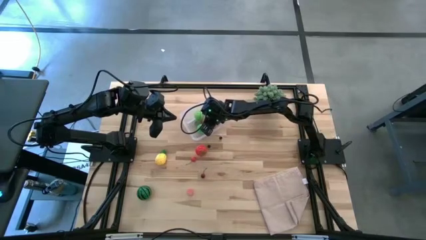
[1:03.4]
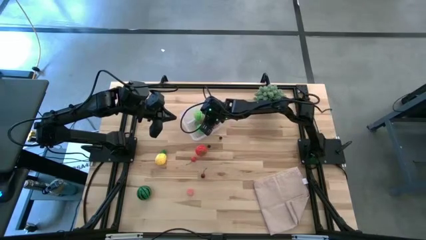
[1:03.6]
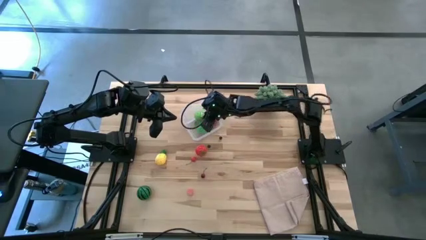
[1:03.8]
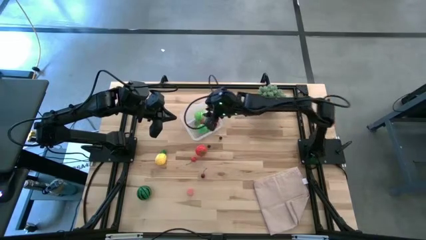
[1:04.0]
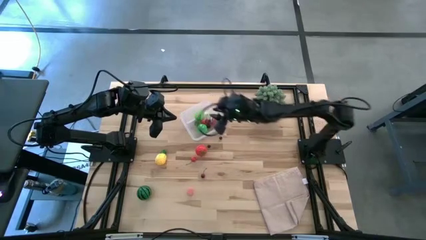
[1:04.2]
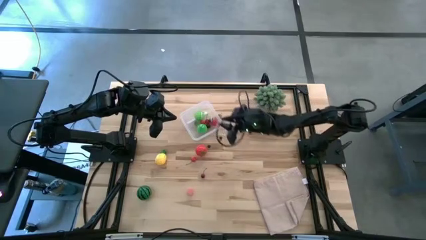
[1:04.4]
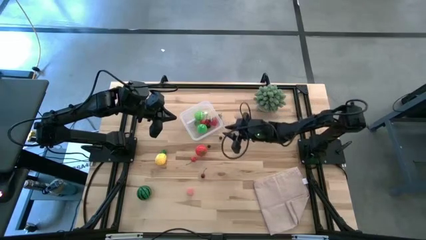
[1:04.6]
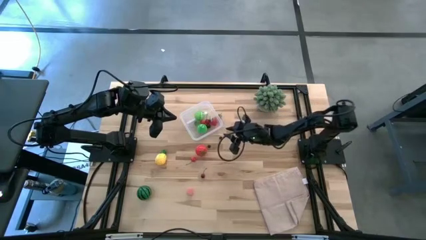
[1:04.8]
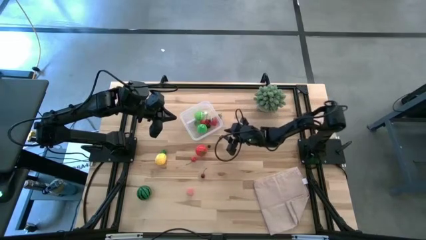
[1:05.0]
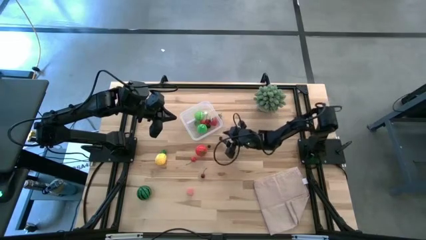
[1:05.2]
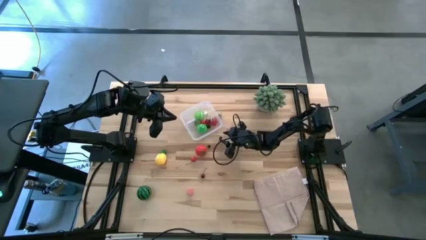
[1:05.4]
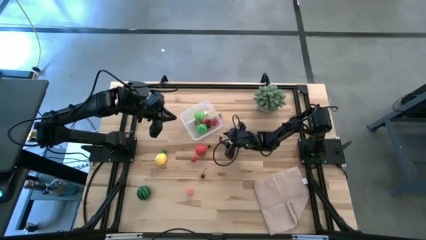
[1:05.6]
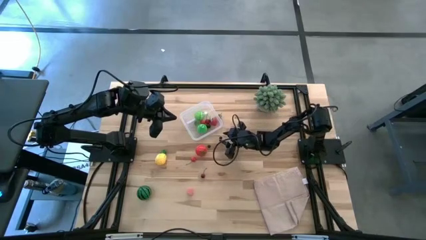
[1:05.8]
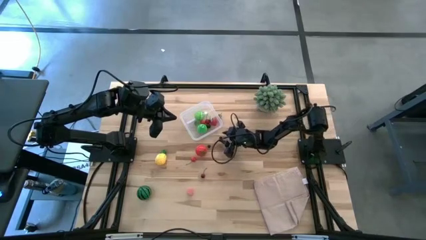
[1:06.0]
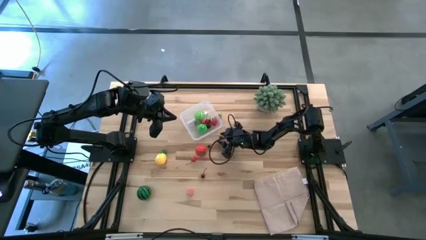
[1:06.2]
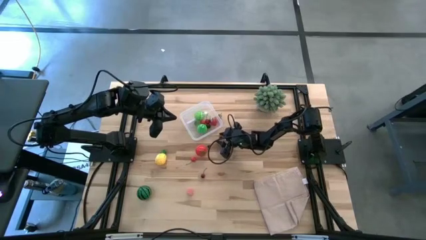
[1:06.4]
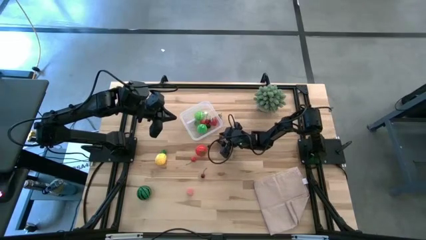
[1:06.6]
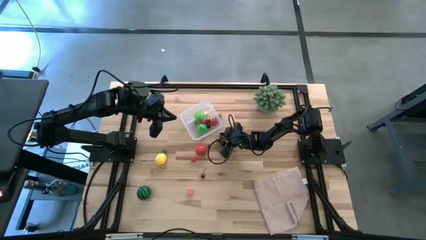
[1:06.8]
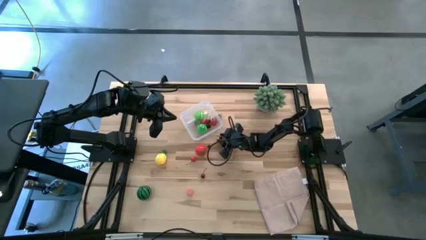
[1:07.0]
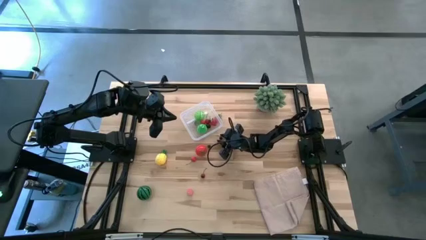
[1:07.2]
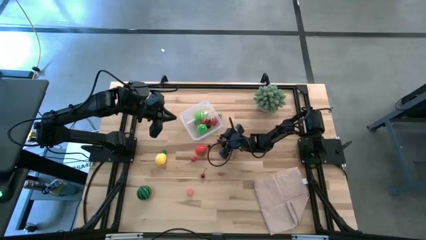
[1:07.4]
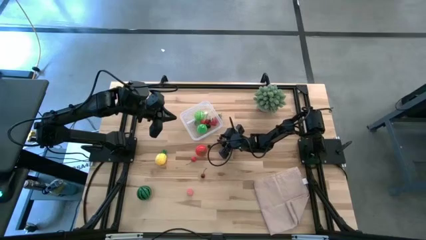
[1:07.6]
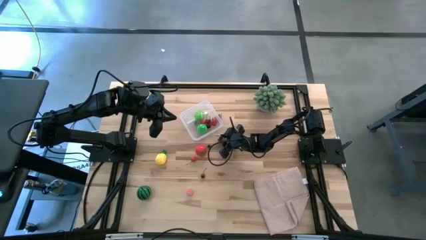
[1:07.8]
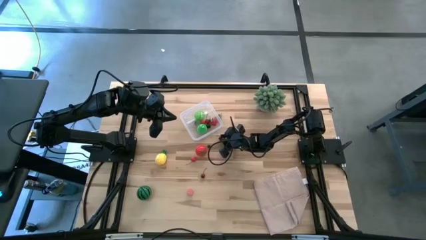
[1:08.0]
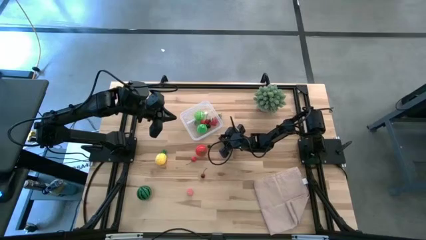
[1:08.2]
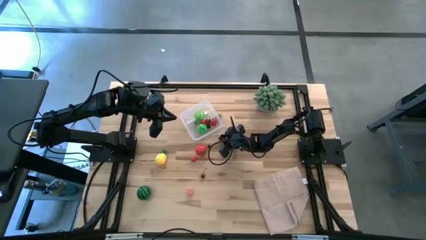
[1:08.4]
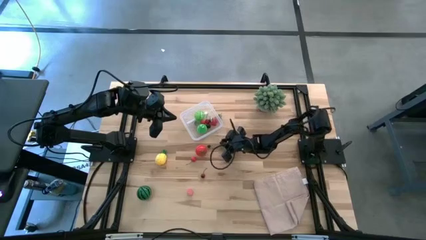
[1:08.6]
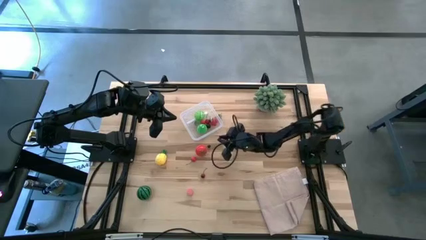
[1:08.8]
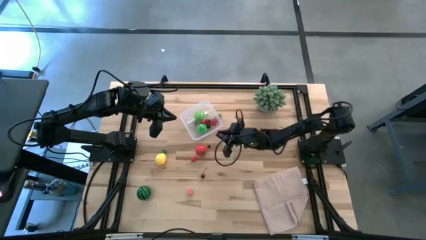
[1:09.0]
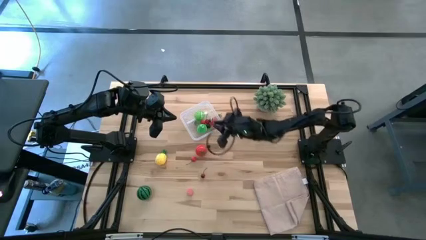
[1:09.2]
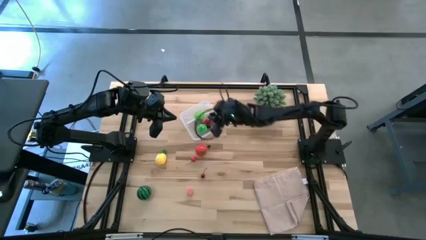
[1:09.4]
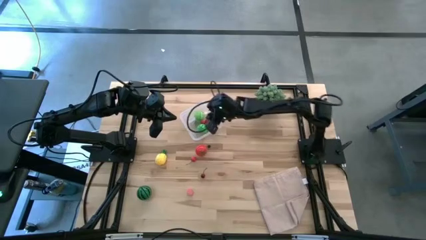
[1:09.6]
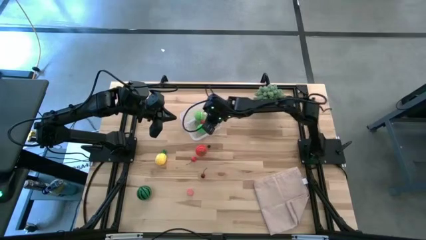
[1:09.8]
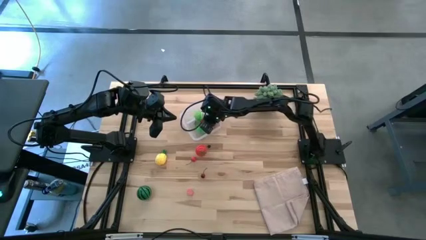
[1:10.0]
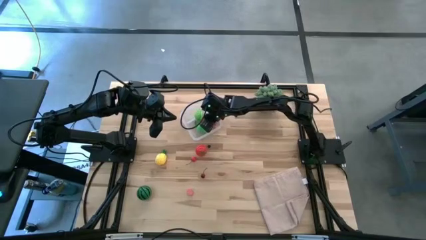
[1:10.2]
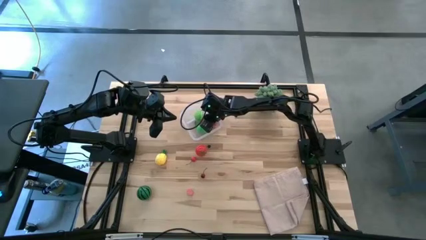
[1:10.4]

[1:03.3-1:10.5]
Task: Pick and placing Produce into tupperware
Put the right blueberry into the transparent bin

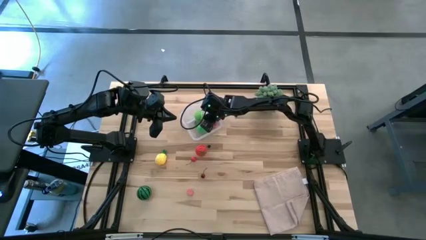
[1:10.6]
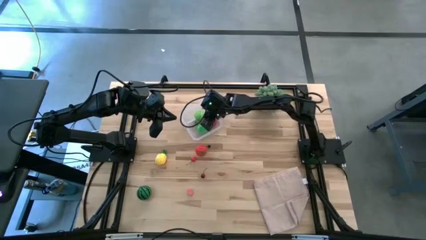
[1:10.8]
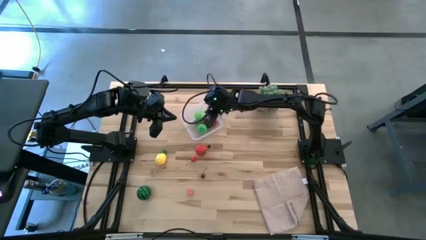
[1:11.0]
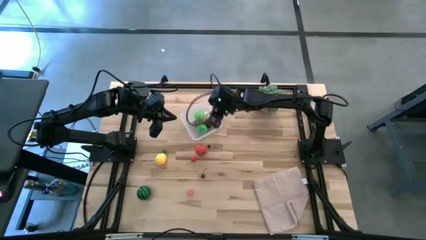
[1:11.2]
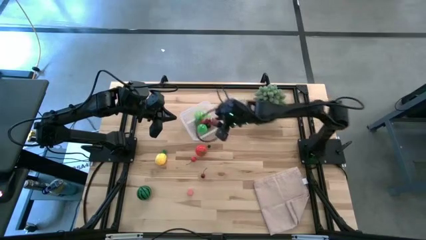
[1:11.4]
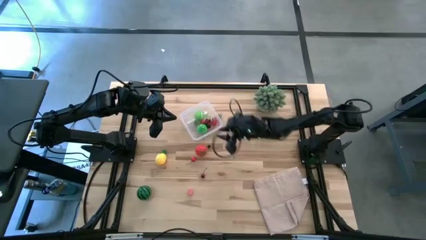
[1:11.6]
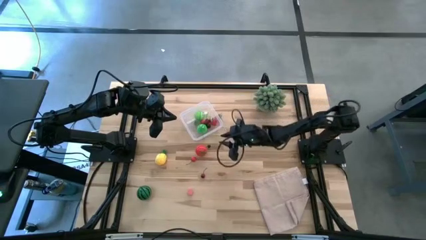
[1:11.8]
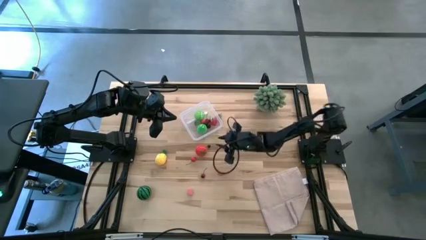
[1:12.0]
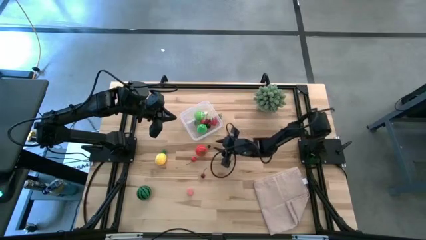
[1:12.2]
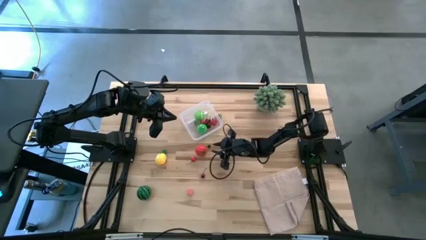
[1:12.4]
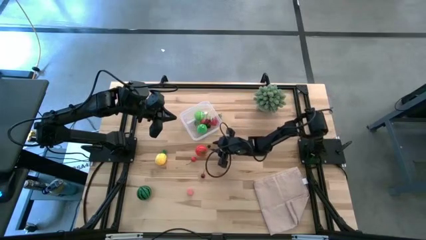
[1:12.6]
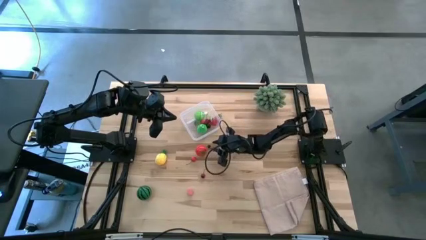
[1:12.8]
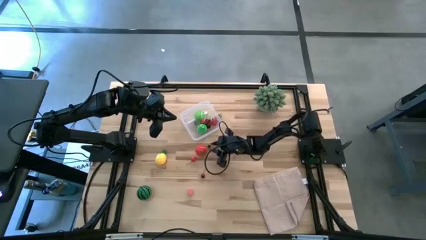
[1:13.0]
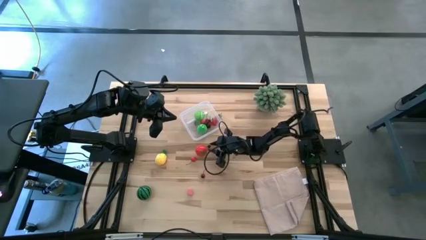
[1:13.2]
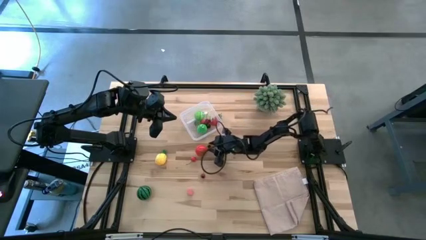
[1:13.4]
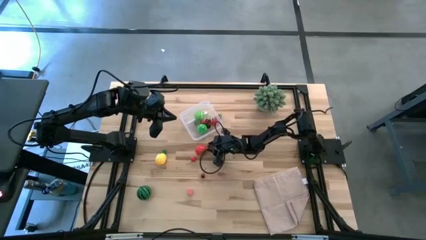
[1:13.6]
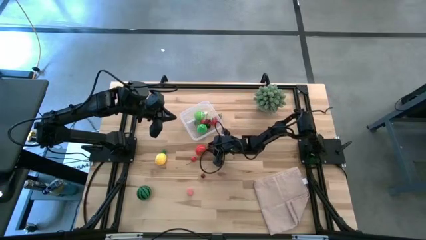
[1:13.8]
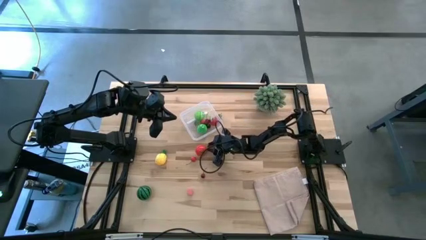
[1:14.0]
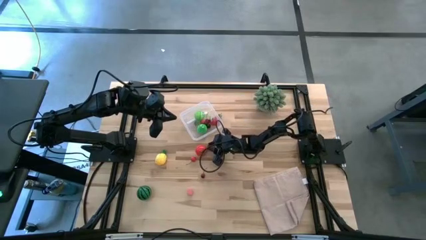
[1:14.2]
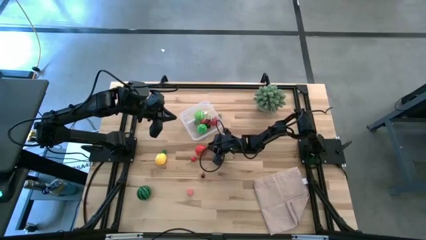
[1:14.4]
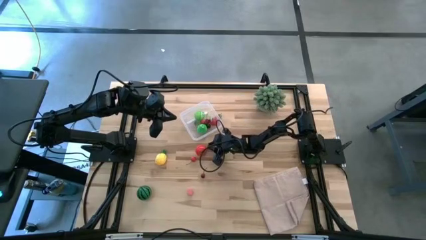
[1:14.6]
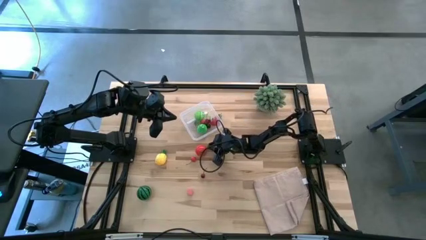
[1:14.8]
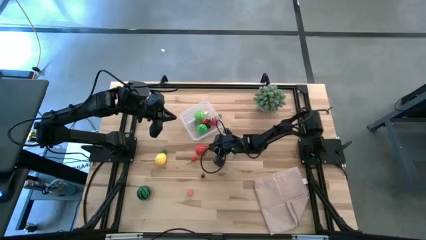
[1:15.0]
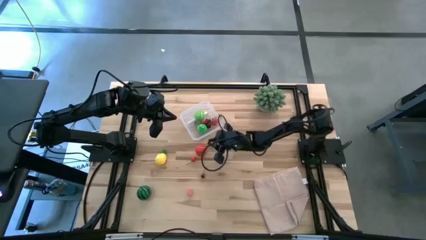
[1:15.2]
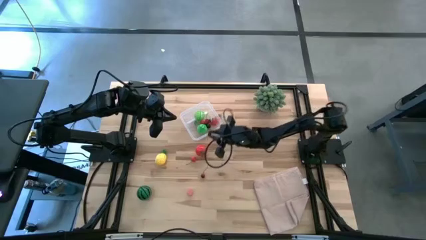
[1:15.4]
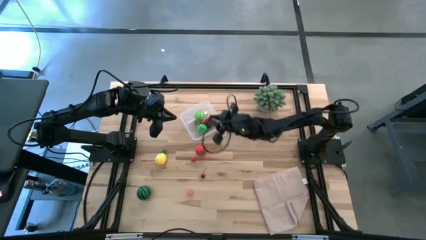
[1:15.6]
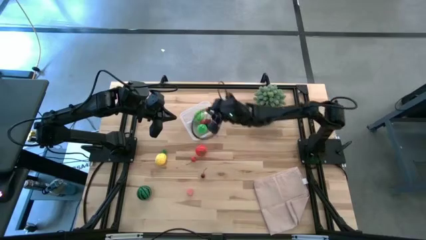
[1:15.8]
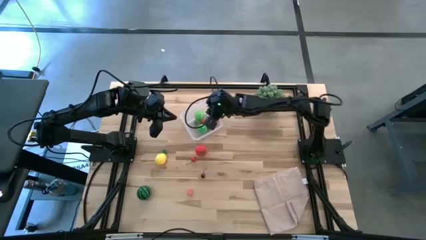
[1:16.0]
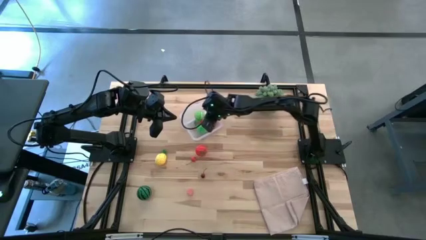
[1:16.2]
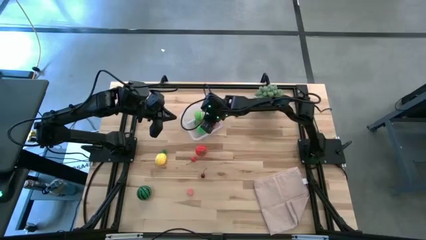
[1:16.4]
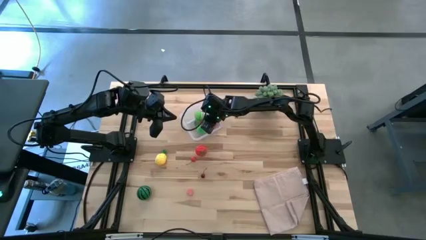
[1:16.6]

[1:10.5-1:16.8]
Put the blueberry into the transparent bin

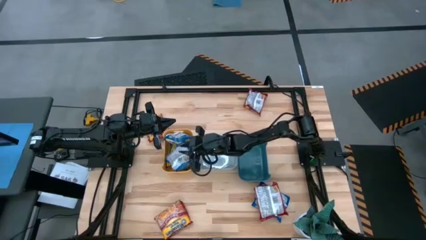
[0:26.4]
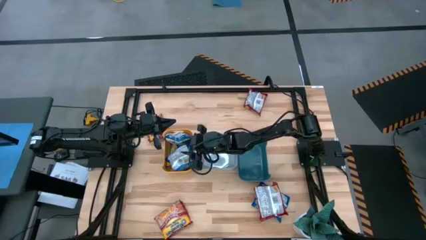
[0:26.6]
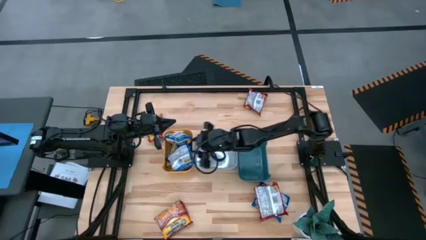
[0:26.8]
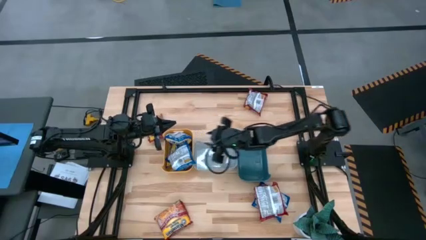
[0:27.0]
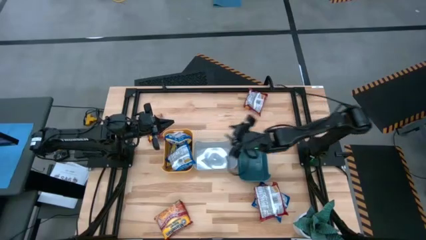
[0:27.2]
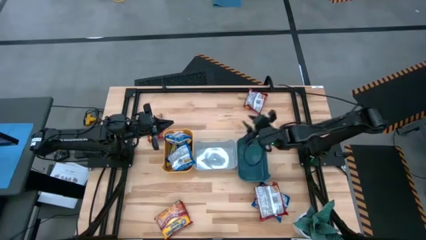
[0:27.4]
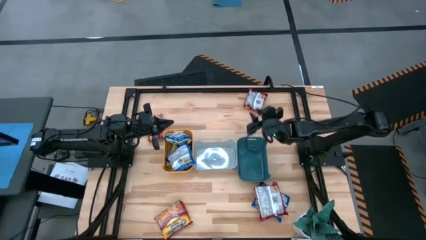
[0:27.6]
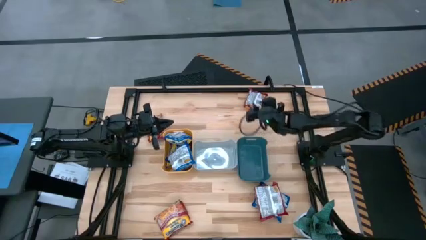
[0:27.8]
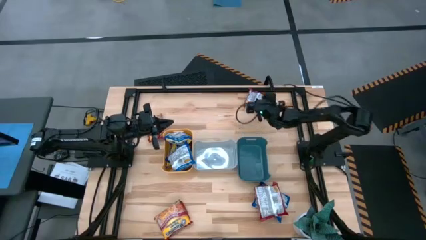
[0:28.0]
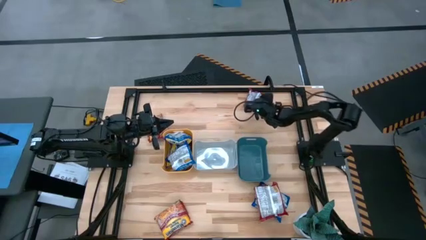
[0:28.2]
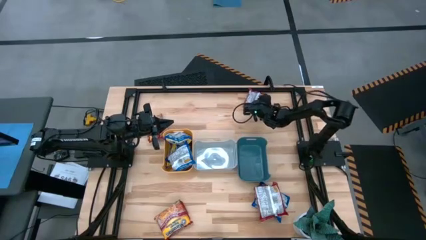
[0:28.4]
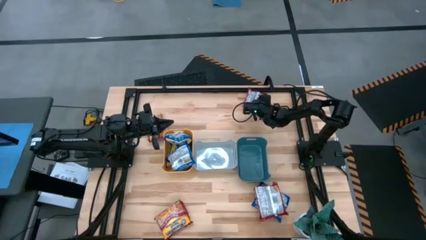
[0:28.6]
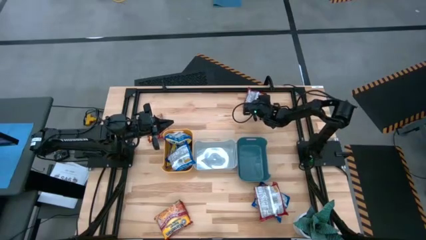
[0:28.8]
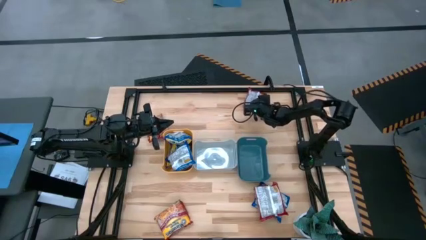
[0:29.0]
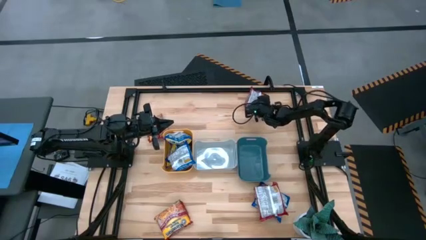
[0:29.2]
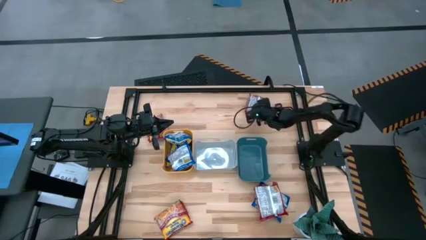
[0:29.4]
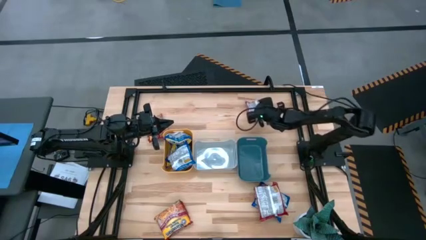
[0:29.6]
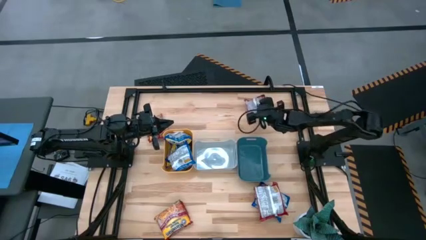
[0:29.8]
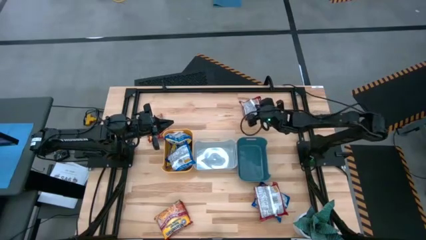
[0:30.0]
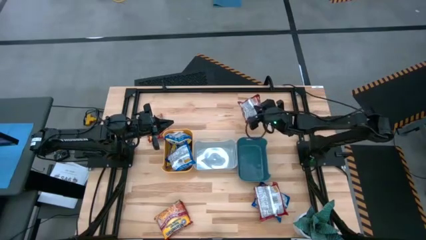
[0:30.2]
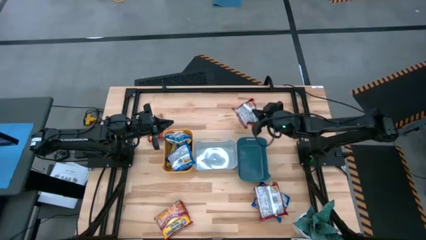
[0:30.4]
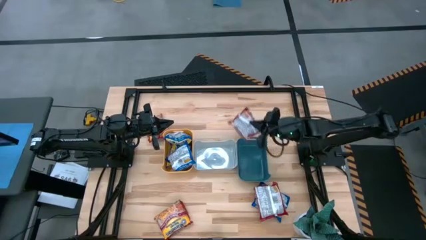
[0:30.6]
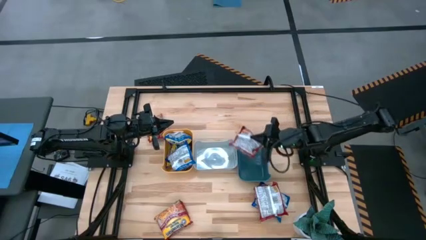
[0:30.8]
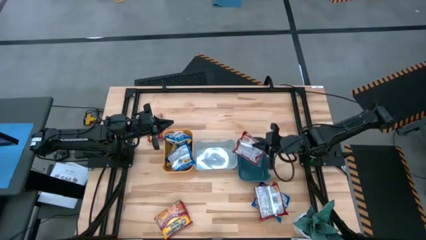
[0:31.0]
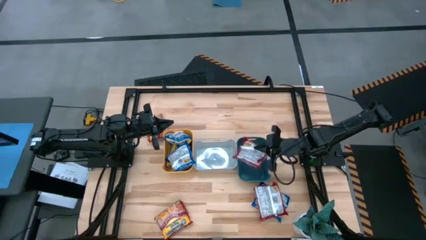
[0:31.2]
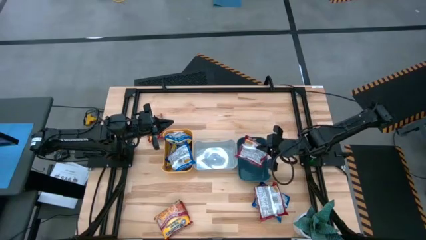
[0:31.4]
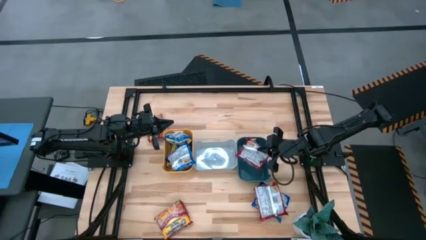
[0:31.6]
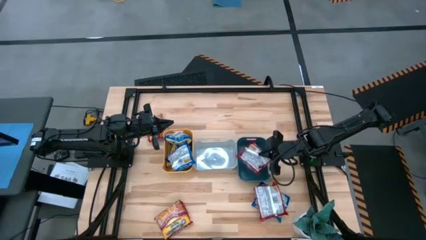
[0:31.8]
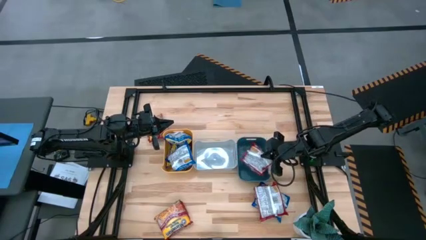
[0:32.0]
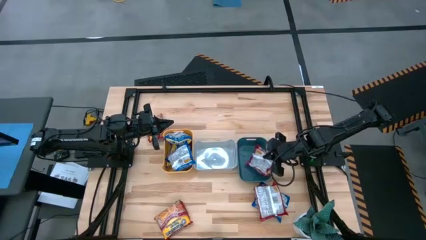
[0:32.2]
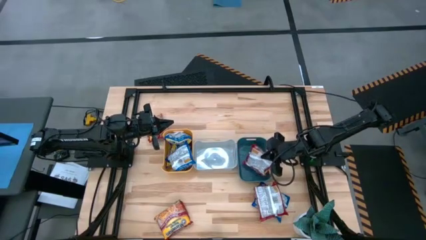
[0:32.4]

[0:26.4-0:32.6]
Task: Sort Maruchan noodles
Put the top right red noodle pack into the blue bin
